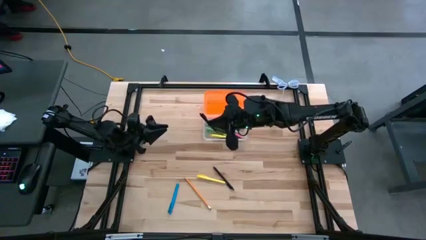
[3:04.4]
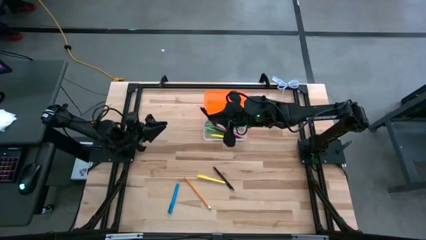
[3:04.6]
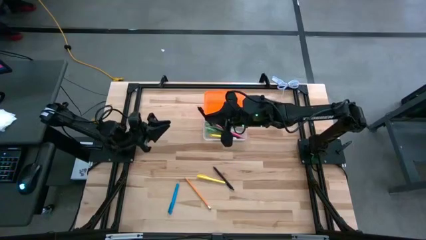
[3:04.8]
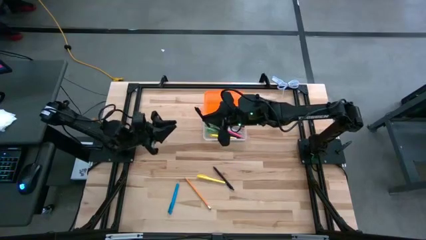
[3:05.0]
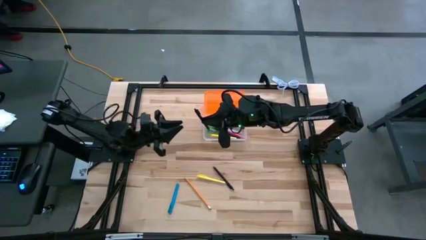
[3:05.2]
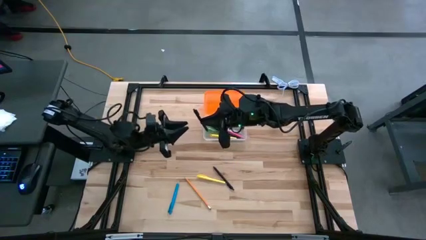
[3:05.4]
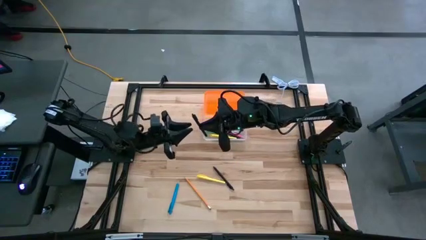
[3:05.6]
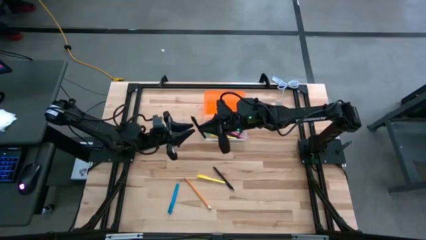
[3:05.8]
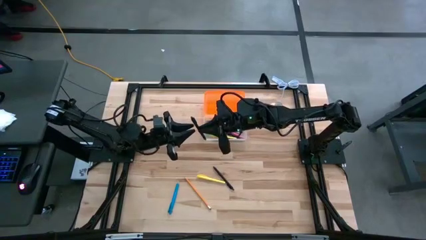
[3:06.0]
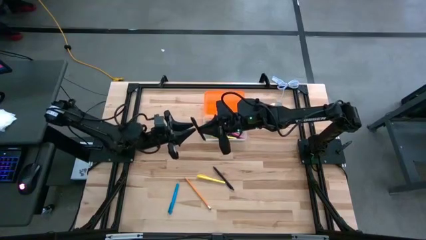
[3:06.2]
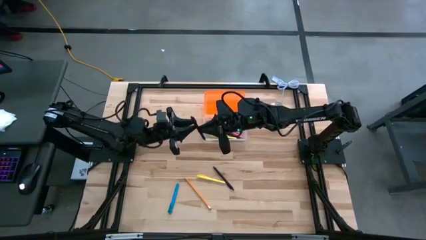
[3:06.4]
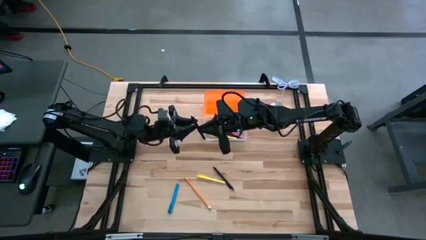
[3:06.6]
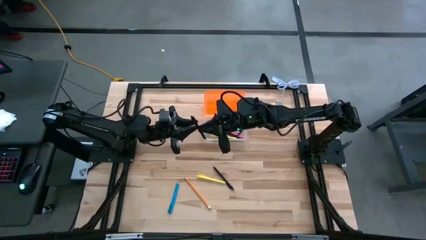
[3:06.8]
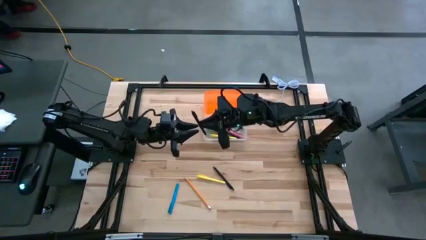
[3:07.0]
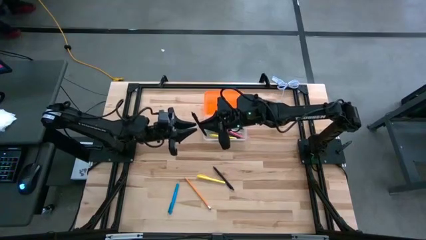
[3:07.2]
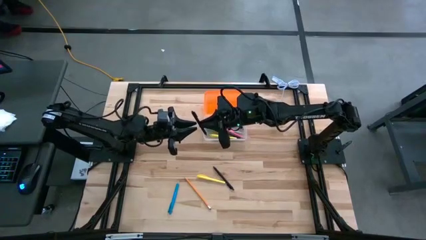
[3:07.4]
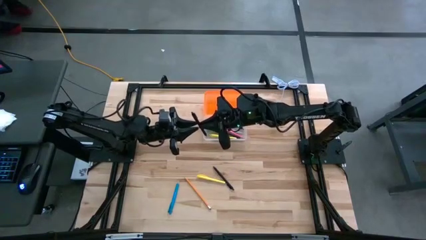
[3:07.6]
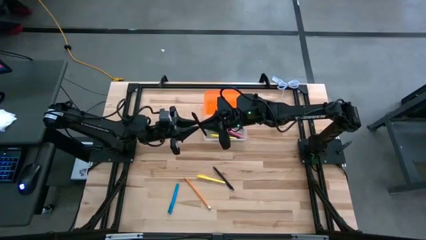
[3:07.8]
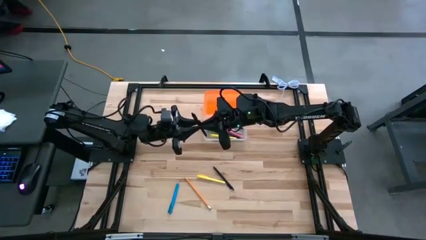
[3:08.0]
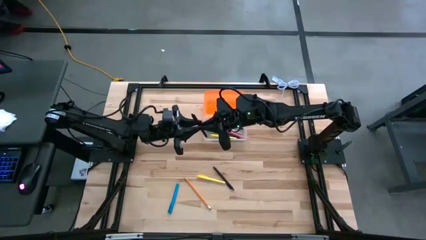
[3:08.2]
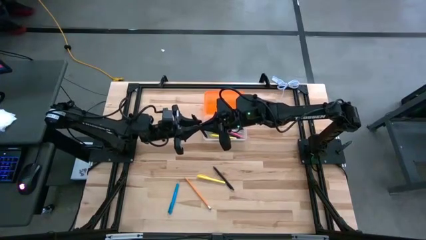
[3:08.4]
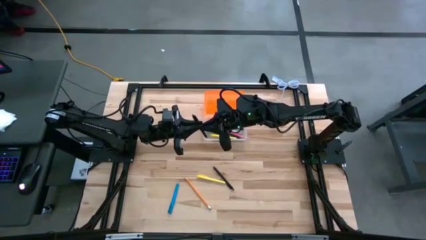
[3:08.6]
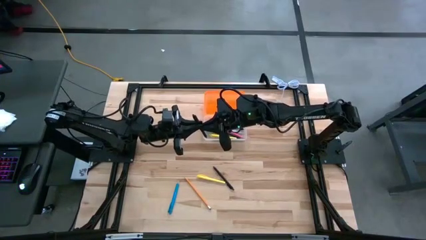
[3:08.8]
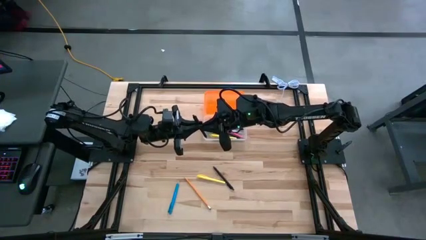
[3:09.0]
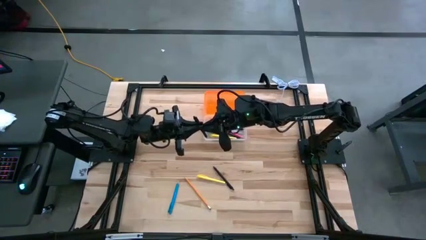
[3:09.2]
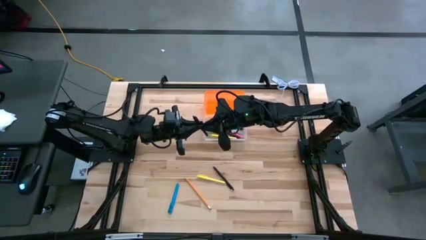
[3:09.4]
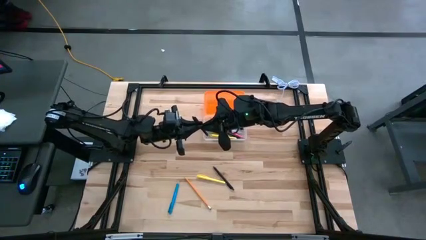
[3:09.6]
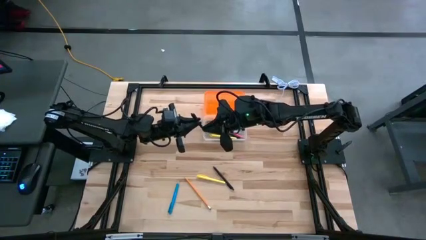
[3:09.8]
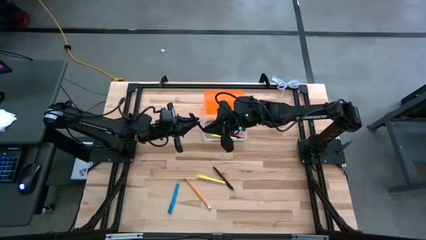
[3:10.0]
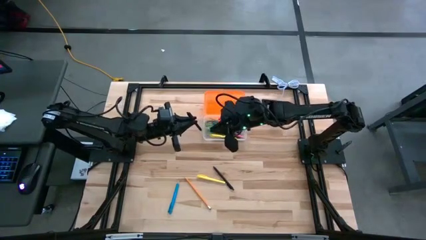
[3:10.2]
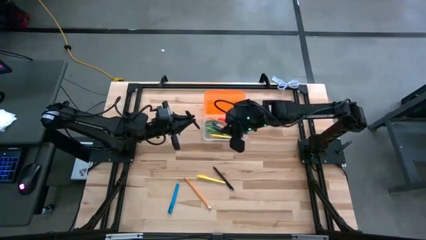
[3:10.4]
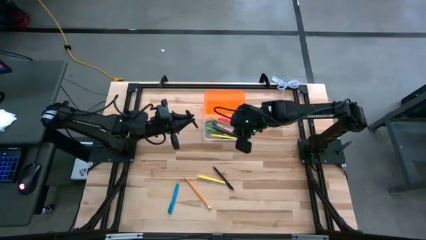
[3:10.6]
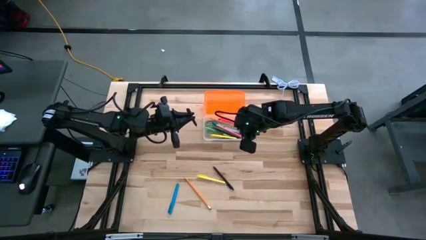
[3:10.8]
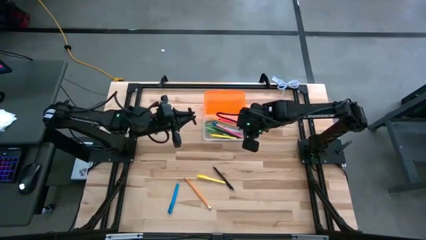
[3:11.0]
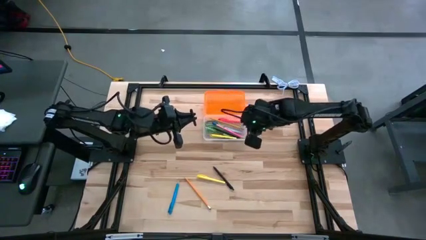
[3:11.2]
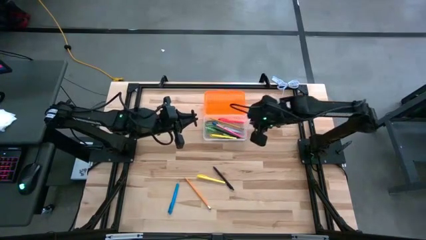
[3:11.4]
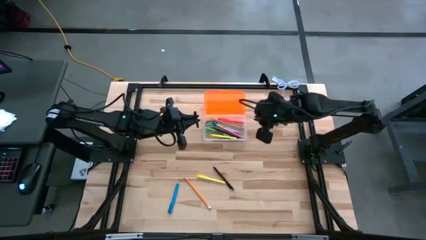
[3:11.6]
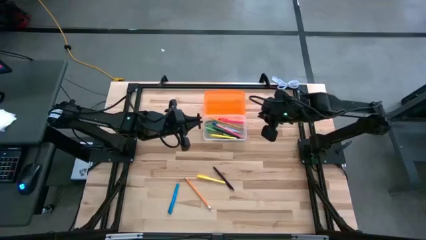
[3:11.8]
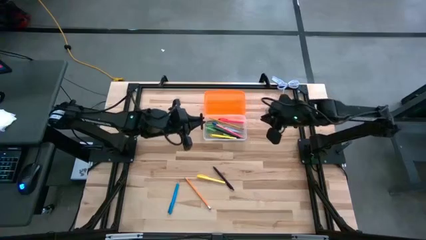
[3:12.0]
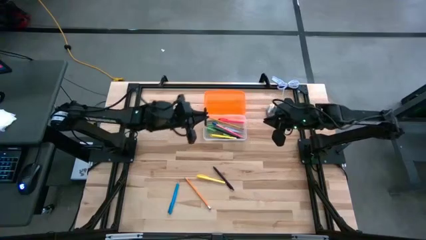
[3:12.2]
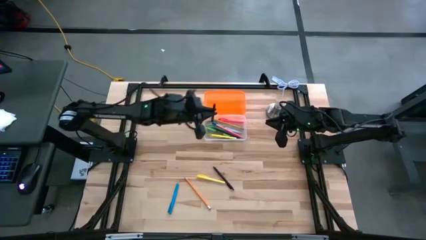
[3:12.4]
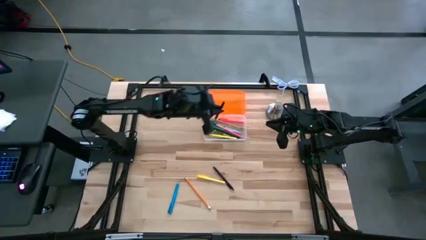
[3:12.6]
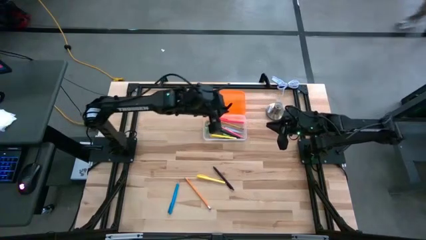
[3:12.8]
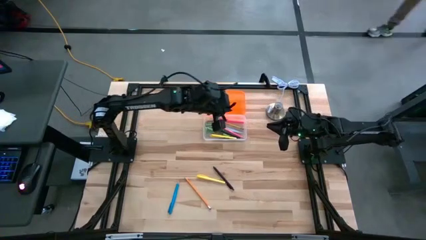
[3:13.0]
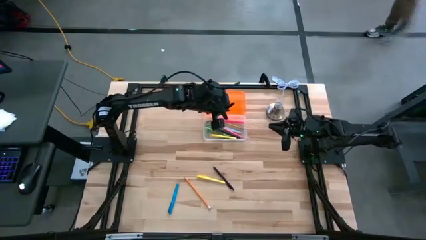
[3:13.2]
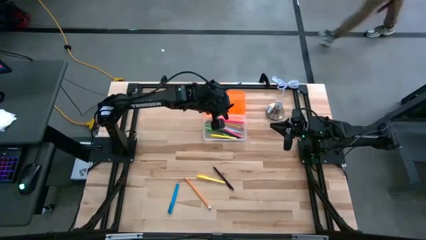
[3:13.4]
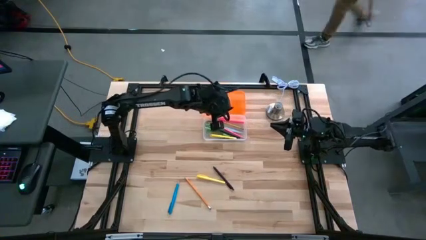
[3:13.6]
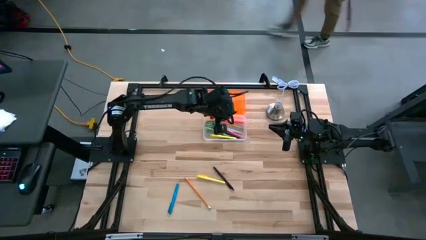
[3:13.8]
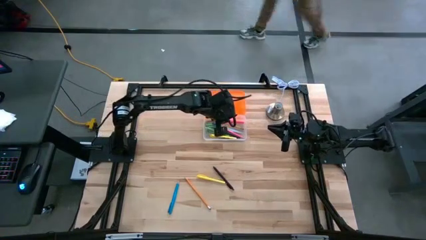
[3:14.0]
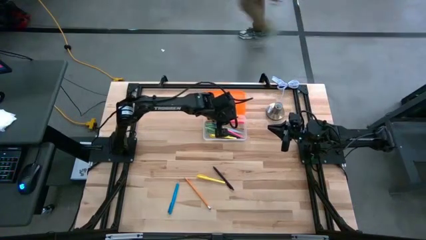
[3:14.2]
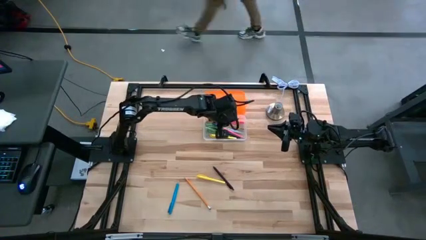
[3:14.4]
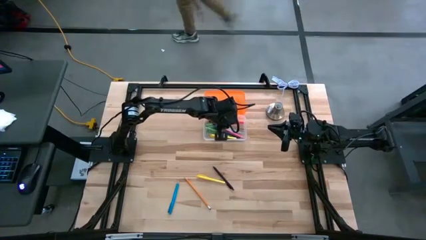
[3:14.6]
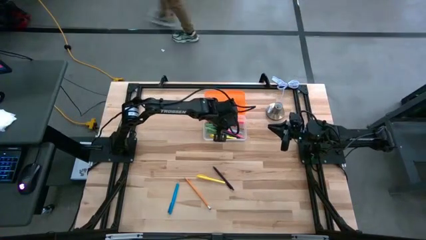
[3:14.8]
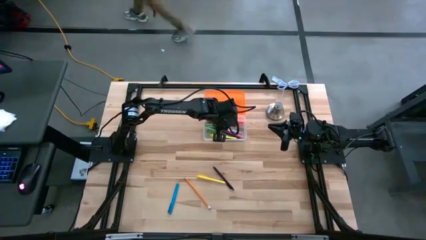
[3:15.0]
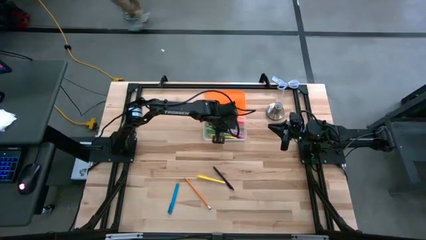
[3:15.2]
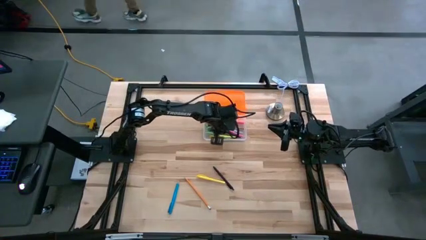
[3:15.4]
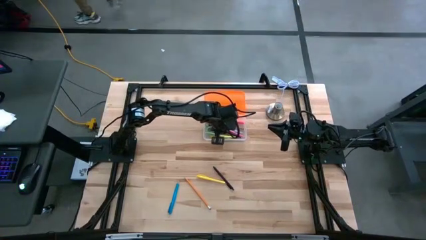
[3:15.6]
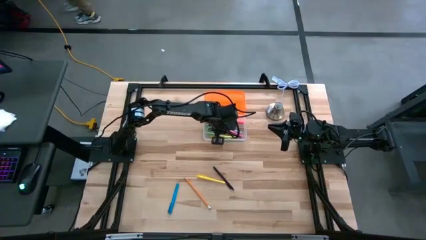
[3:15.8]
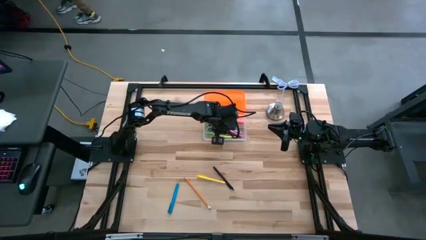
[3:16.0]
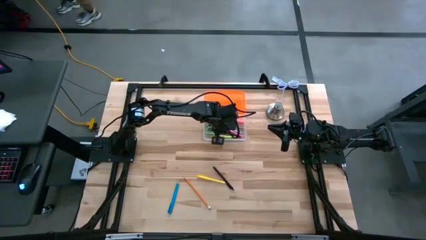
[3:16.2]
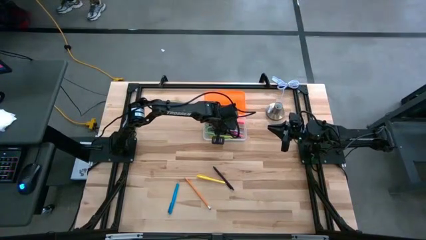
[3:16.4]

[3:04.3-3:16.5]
Task: Pick & place school supplies into a supply box
Put the right black pen into the supply box

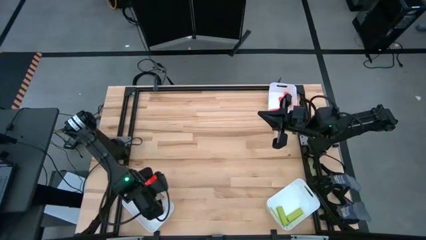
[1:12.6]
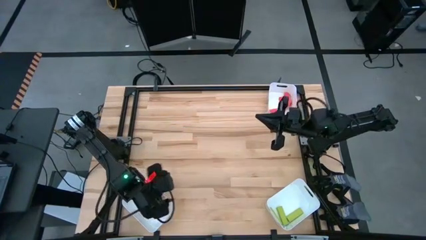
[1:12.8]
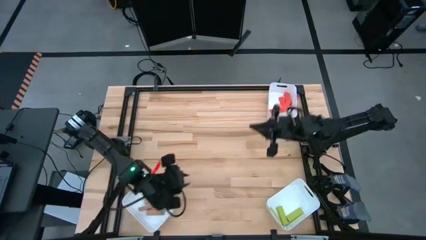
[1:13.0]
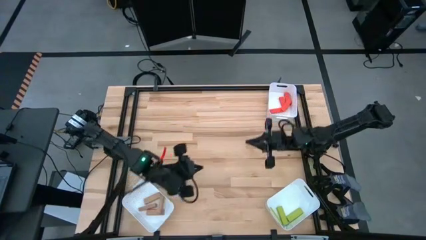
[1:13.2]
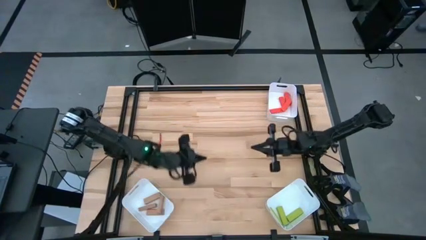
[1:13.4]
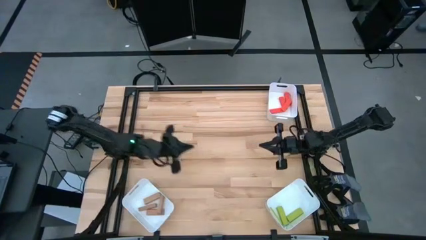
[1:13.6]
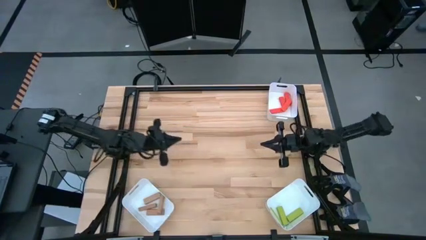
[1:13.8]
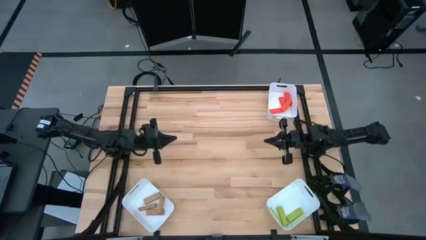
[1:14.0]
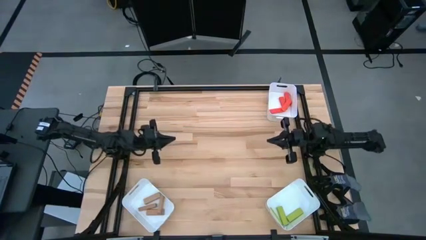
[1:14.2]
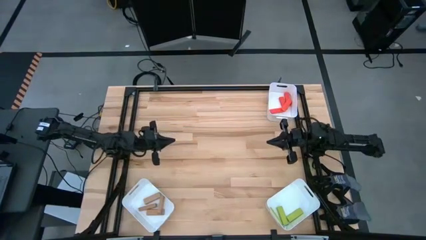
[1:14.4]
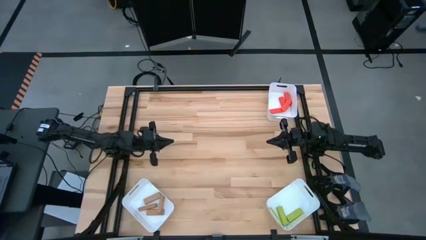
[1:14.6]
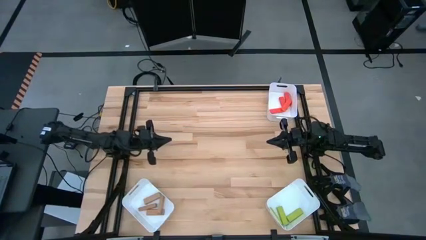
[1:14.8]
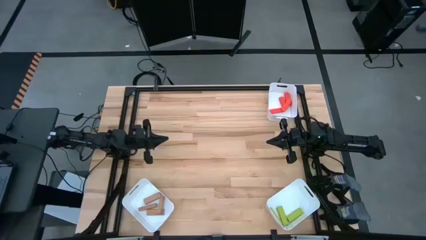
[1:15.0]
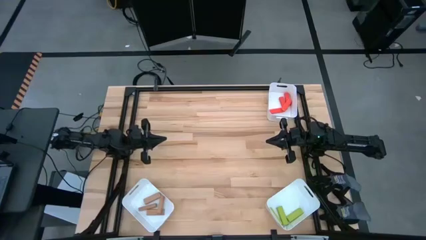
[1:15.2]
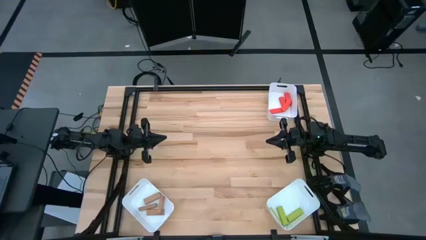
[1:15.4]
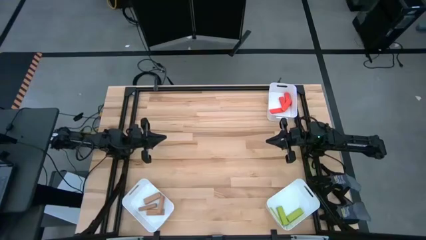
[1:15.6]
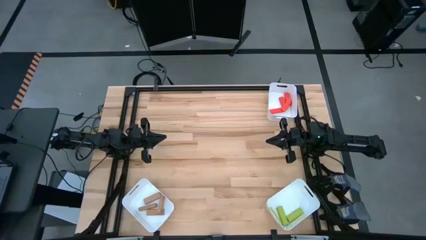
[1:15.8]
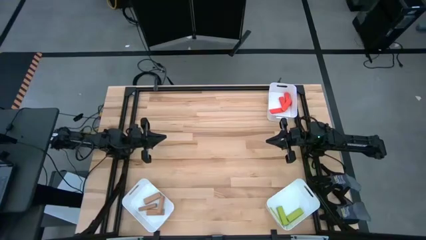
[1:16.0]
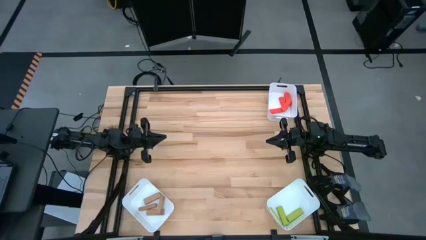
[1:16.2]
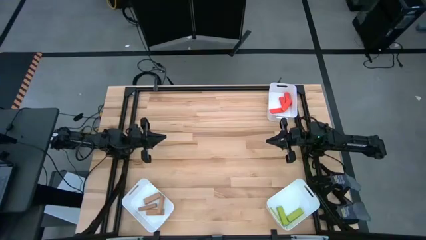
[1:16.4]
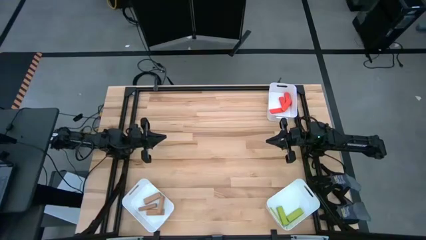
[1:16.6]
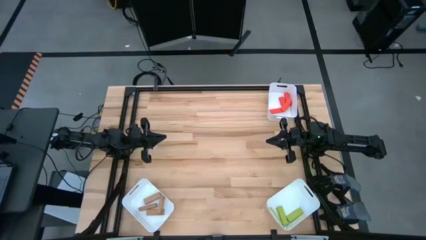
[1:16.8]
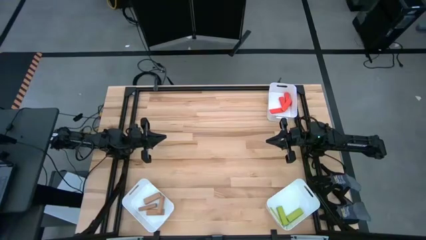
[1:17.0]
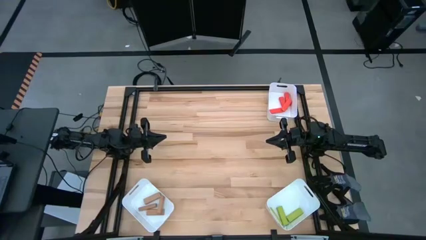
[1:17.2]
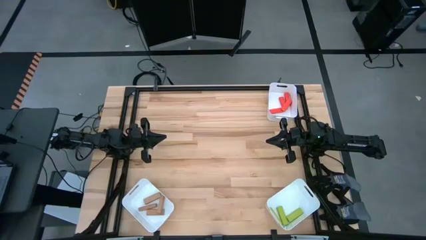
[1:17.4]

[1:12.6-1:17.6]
Task: Sort blocks
Return to Home Position
